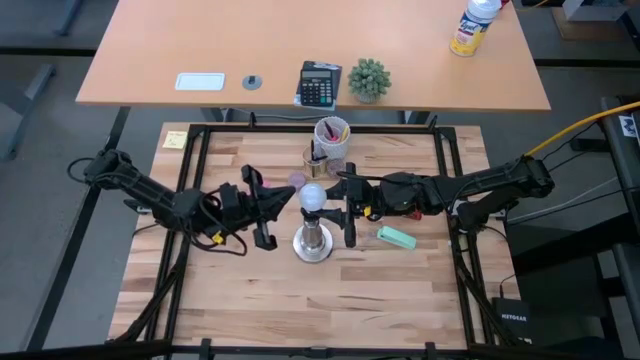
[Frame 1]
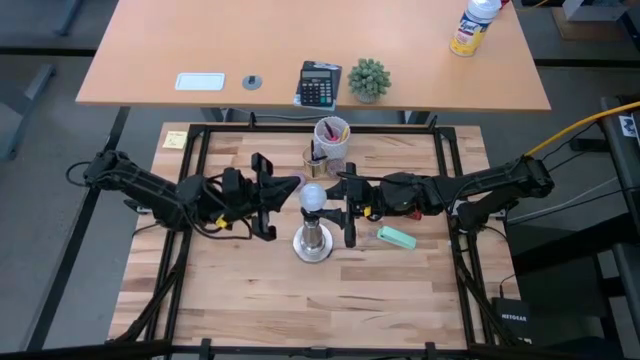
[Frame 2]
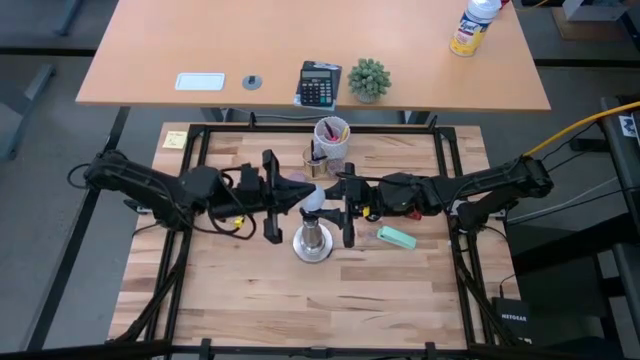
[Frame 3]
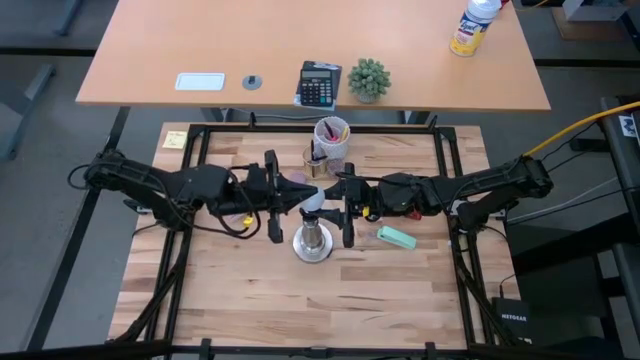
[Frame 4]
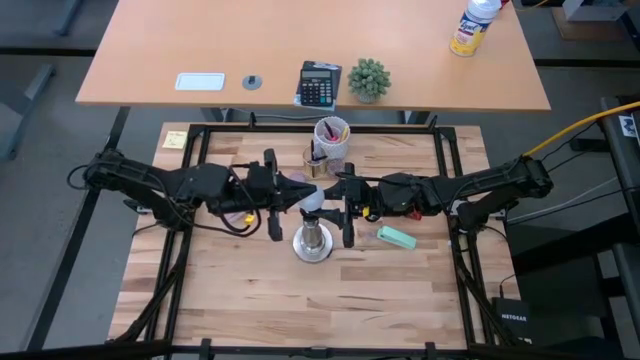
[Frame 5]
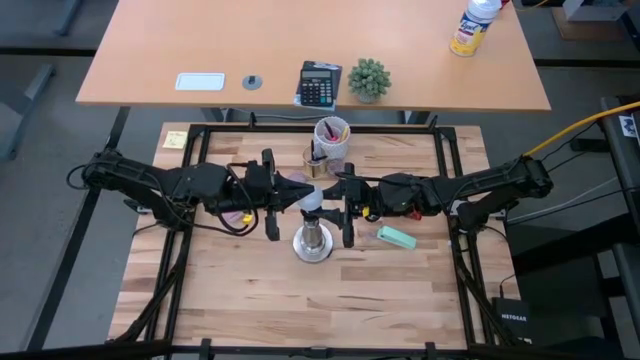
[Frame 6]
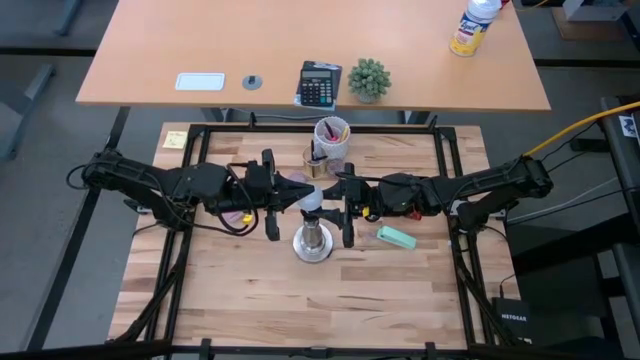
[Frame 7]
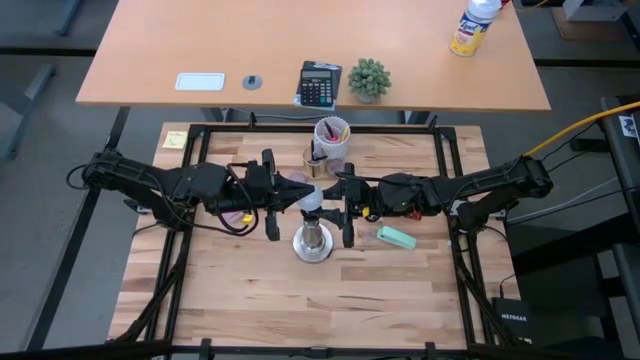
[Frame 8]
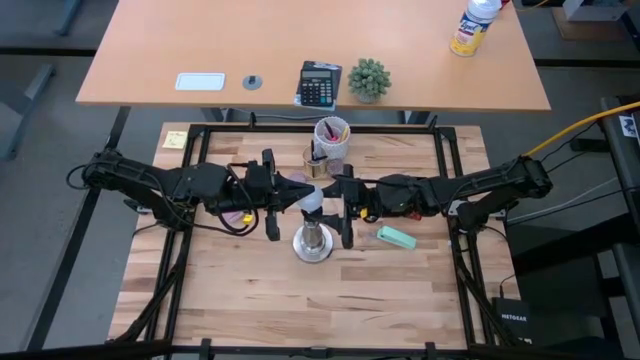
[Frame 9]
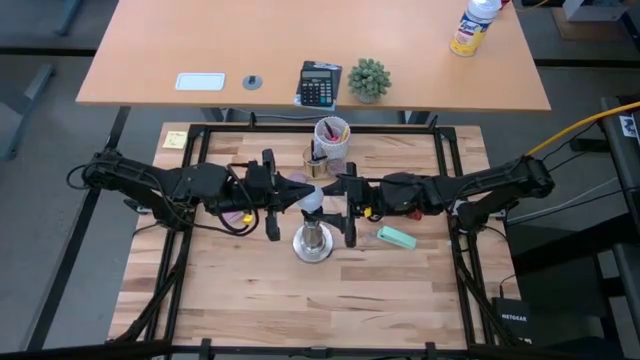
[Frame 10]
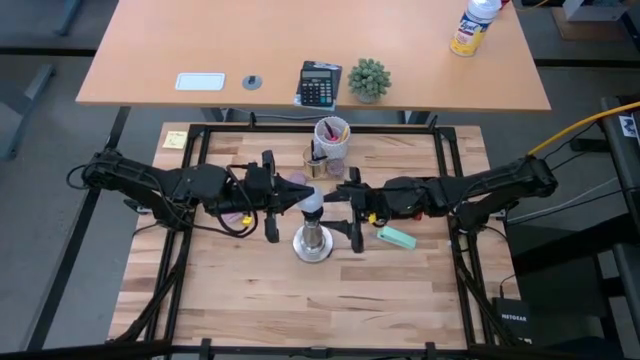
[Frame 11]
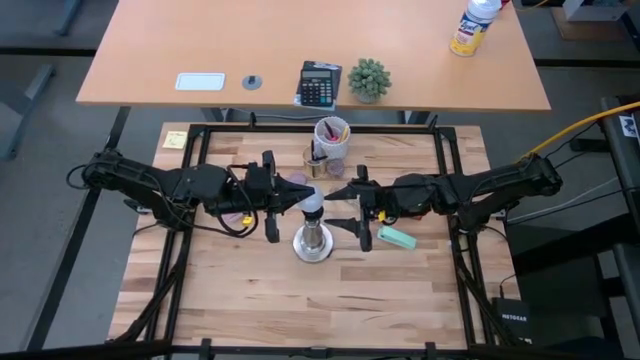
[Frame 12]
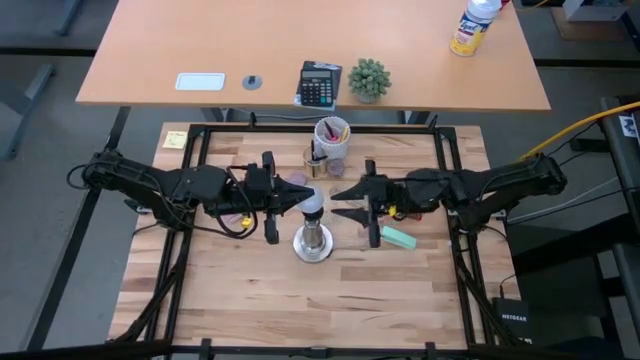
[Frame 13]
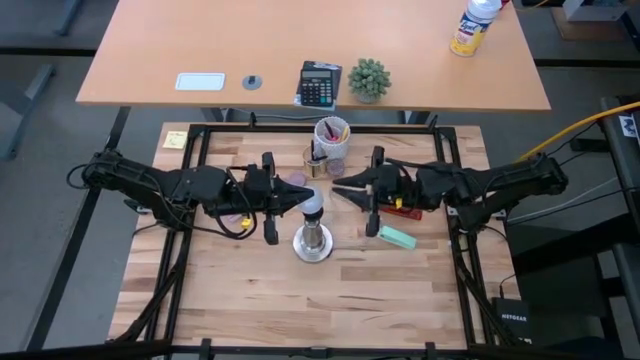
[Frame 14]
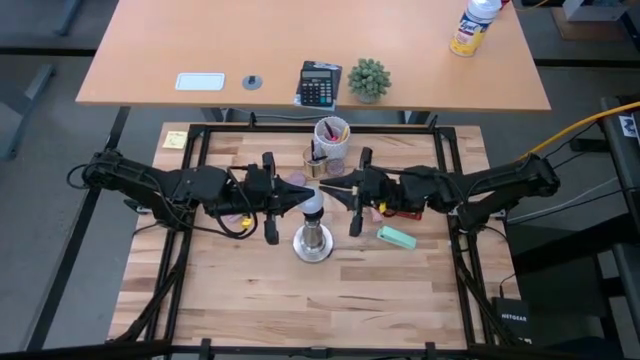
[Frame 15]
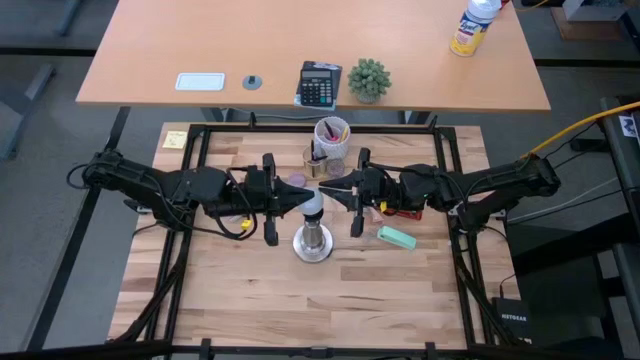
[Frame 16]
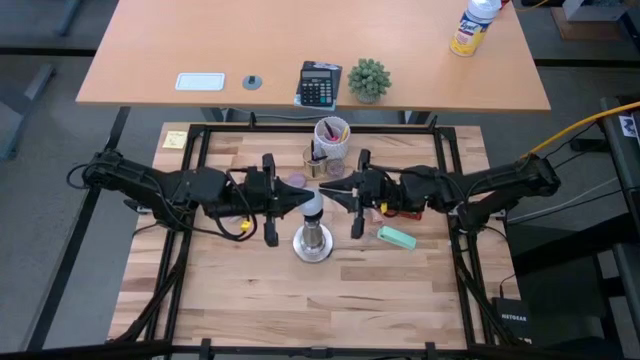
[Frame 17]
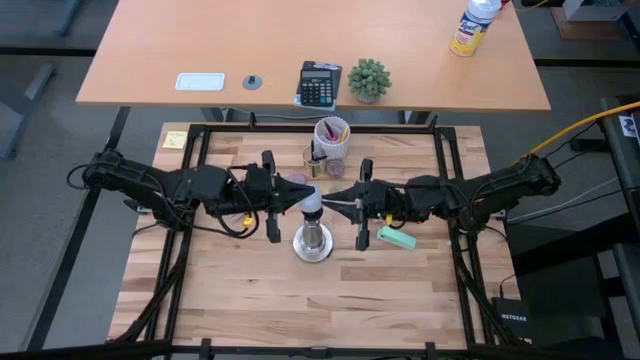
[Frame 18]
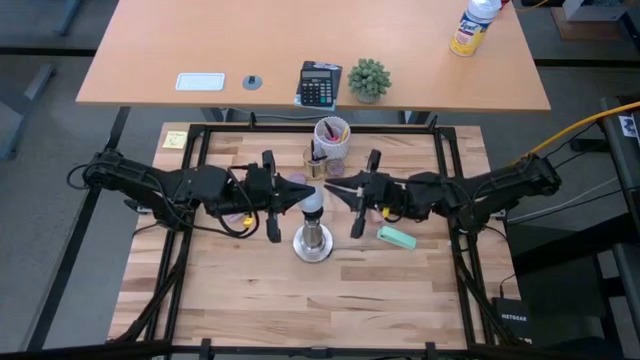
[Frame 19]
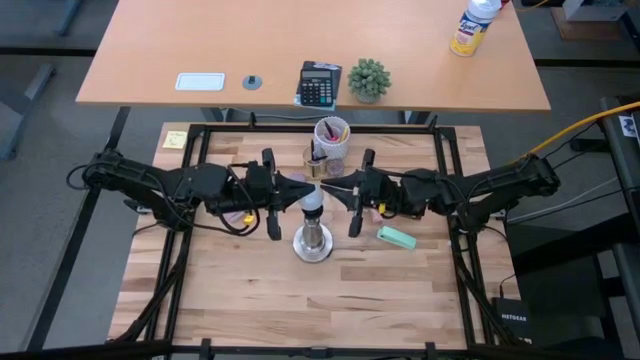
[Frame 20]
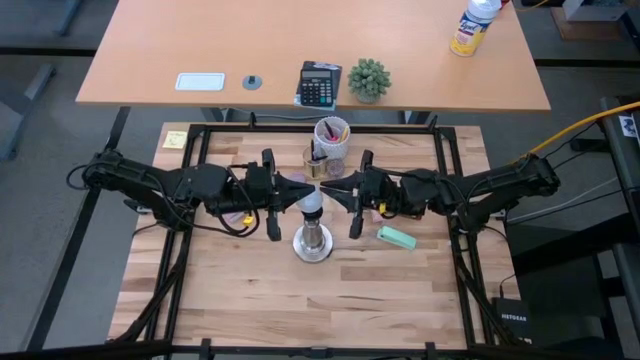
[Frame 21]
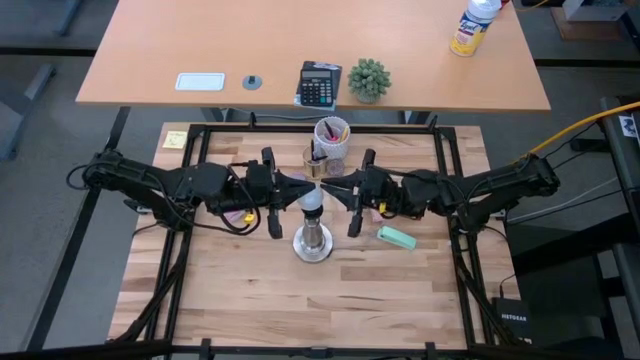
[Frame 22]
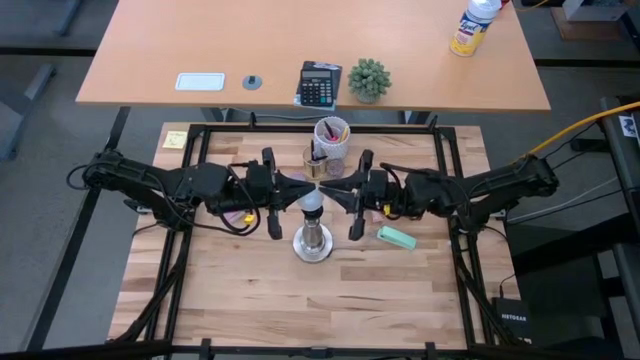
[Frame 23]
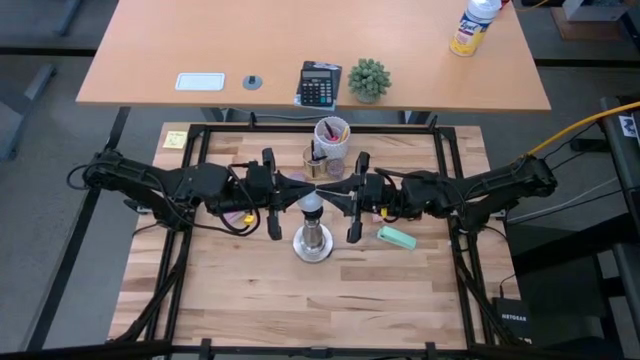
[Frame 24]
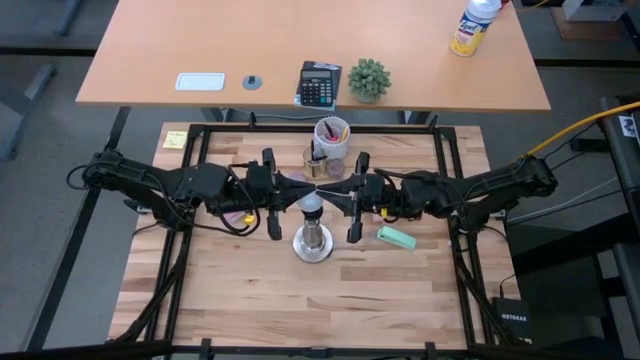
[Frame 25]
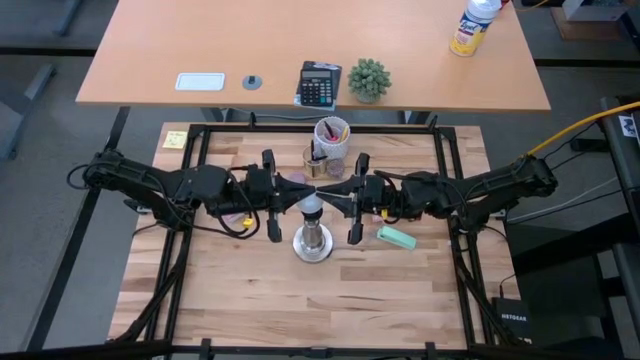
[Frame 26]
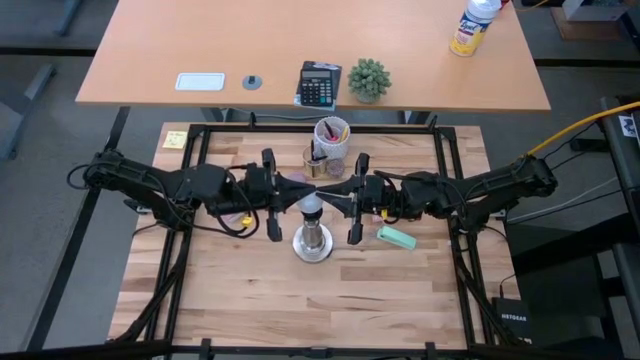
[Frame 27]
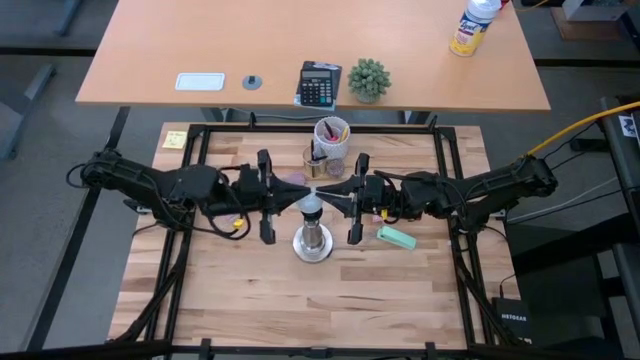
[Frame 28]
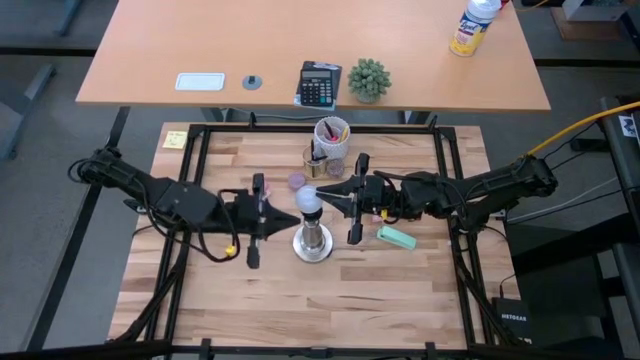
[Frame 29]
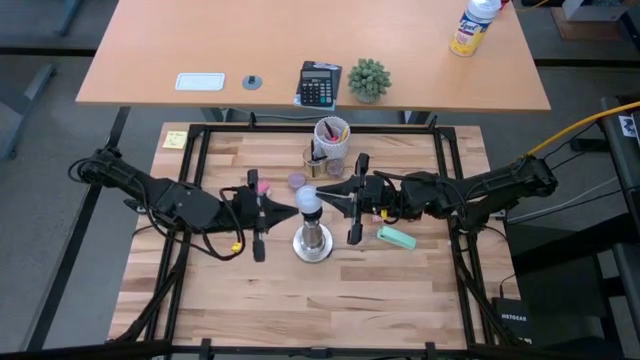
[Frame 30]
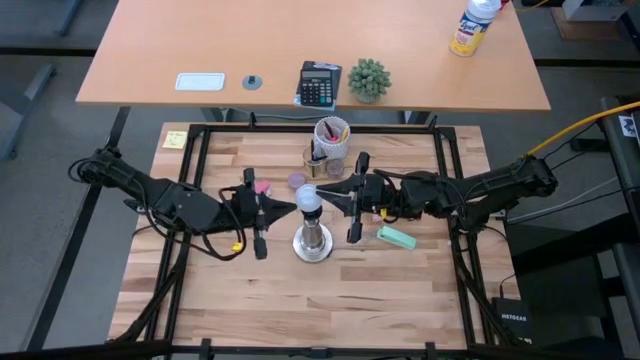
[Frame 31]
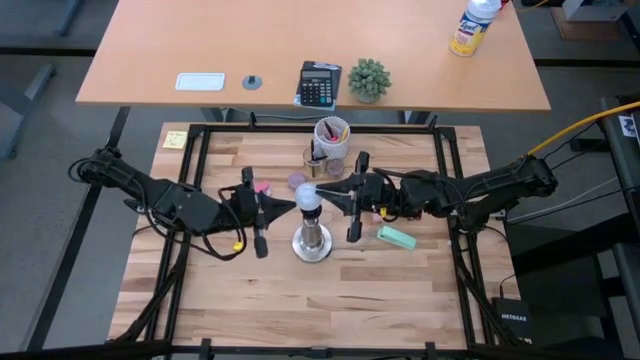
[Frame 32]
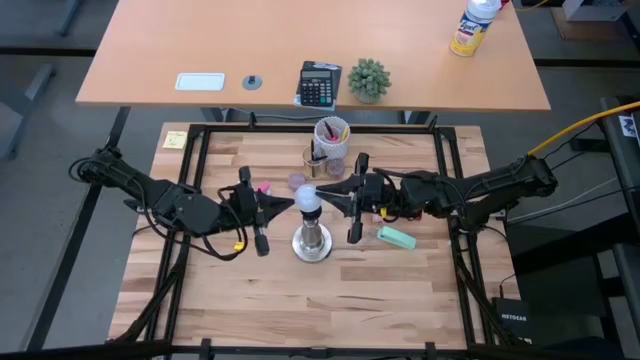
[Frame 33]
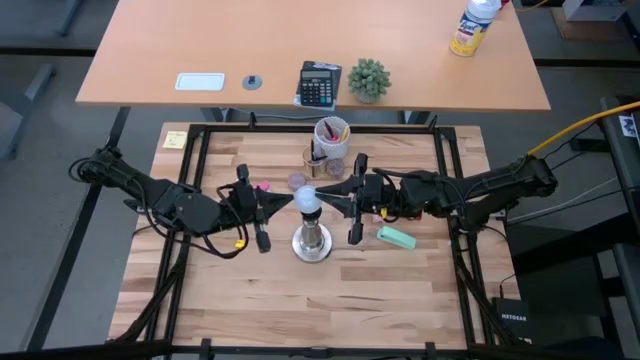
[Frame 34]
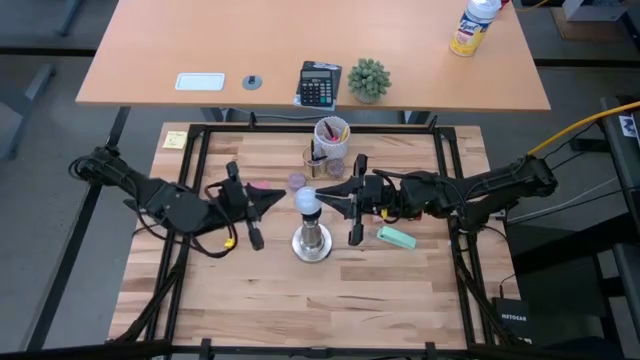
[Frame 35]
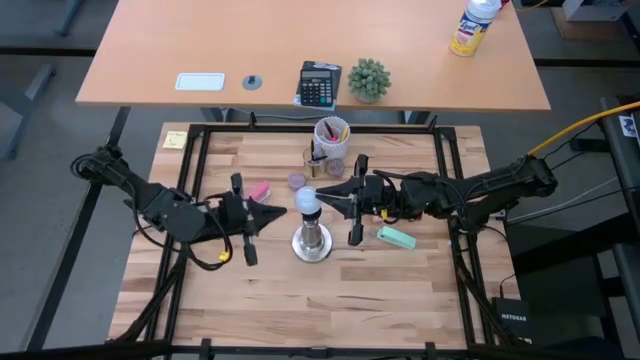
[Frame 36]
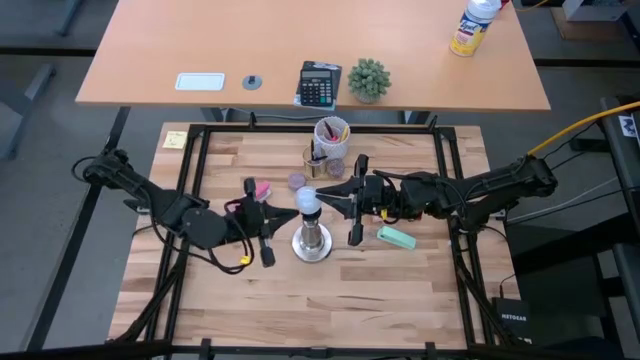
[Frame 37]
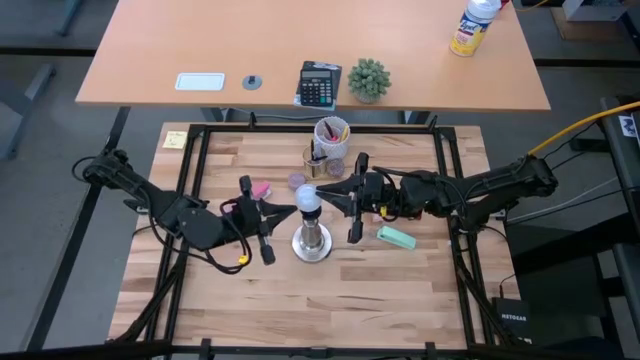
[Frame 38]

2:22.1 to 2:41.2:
Task: Screw lightbulb
Insert the lightbulb into the lamp socket

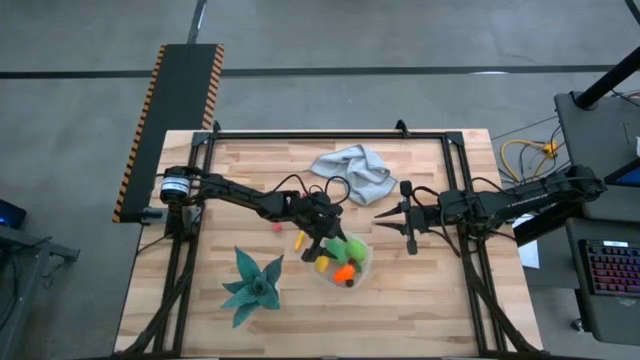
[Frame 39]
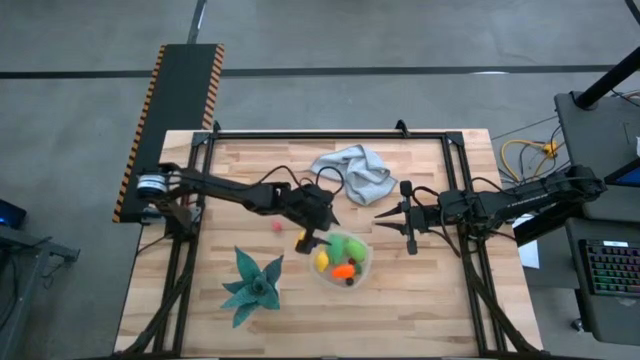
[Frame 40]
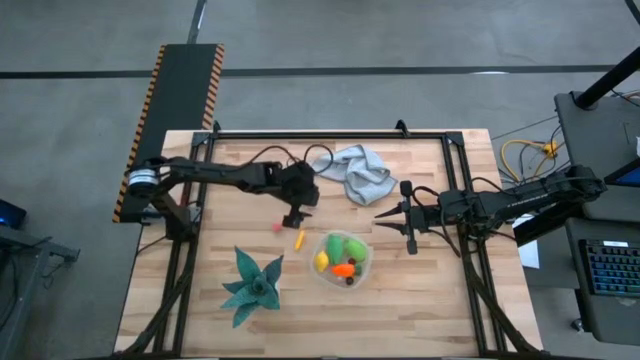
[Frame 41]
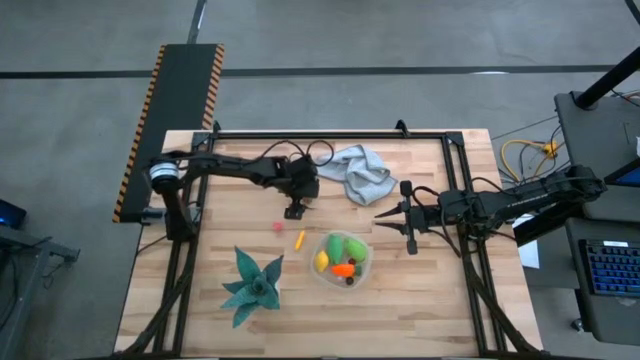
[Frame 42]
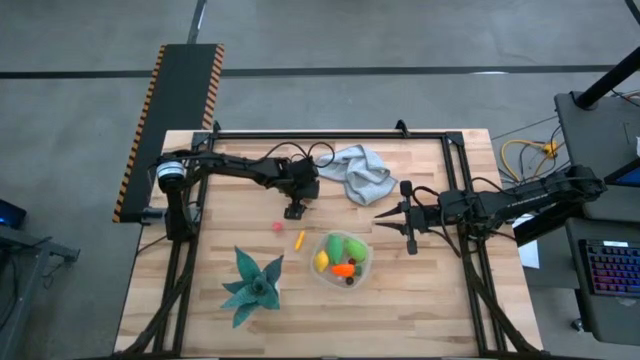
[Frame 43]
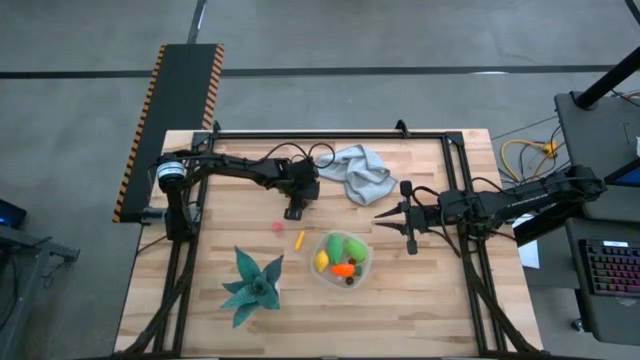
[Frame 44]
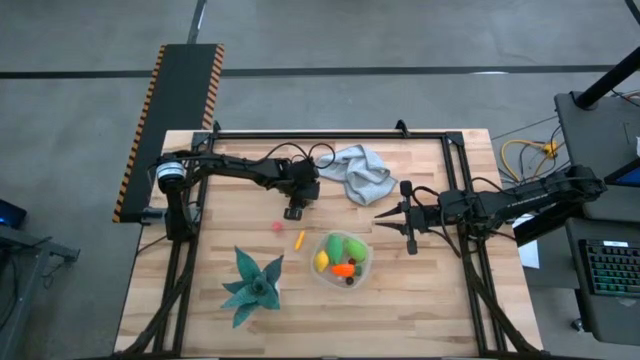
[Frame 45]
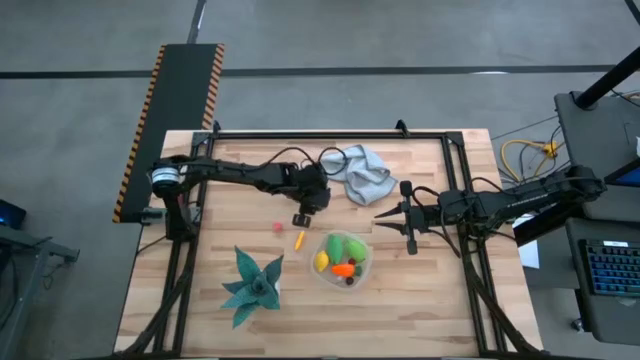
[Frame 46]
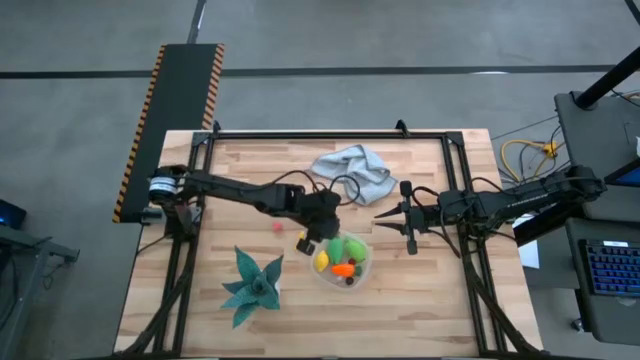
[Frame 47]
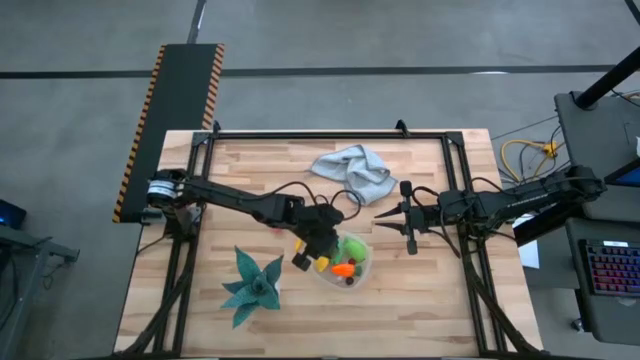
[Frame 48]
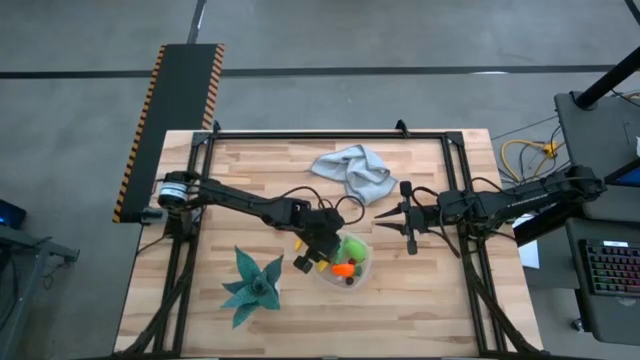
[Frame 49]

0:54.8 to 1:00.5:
Task: Pick and placing Produce into tupperware
Put the strawberry into the container
